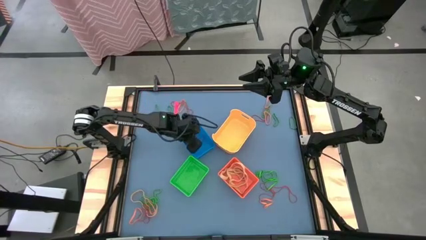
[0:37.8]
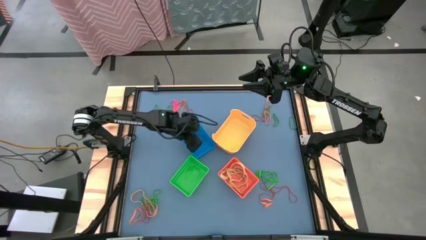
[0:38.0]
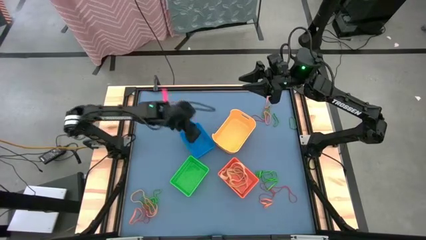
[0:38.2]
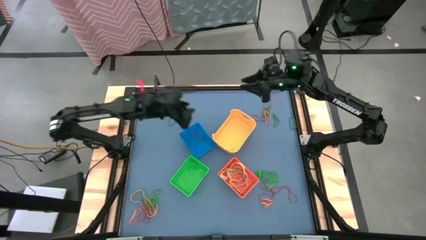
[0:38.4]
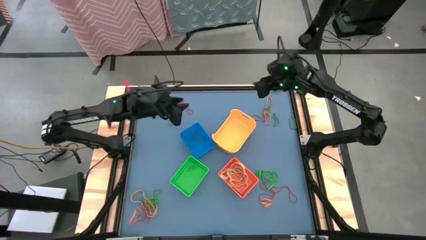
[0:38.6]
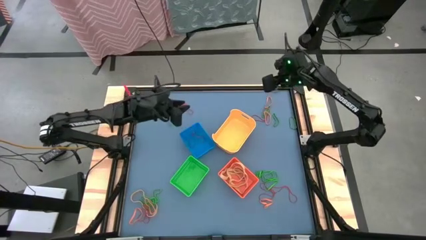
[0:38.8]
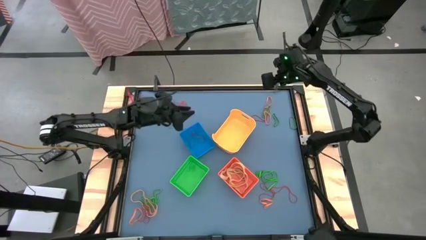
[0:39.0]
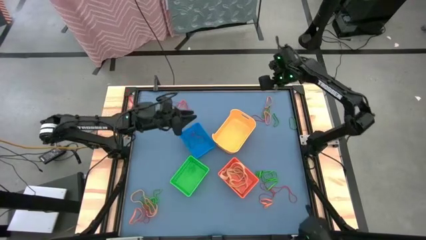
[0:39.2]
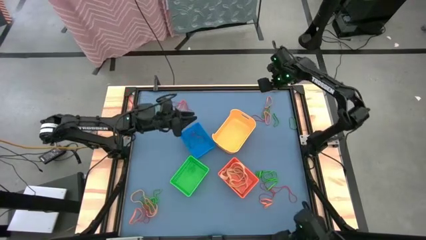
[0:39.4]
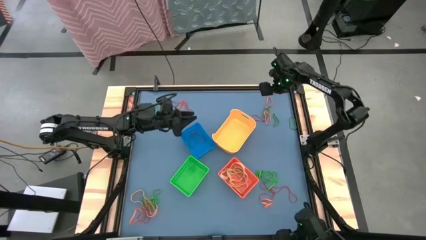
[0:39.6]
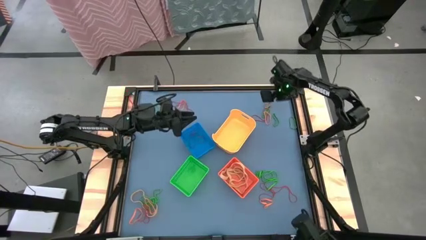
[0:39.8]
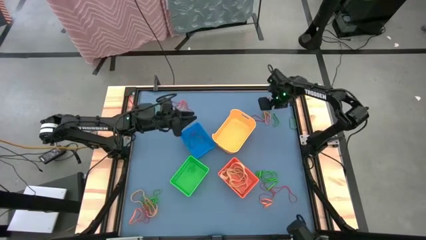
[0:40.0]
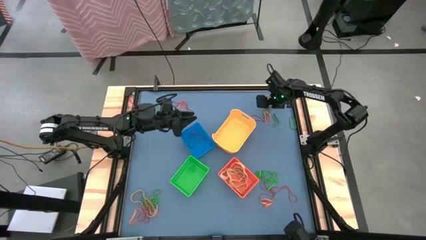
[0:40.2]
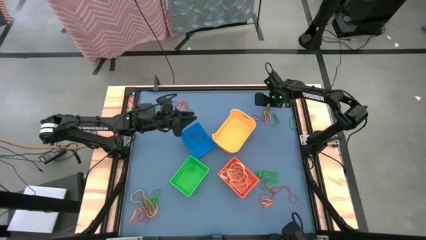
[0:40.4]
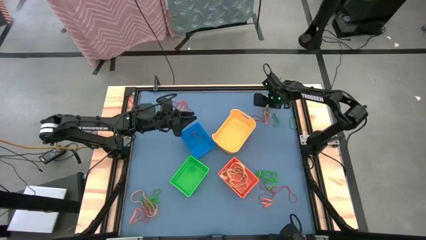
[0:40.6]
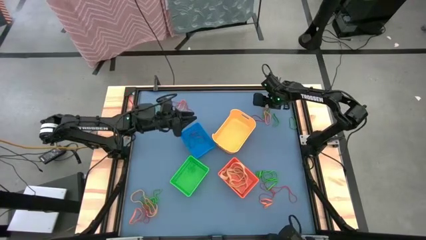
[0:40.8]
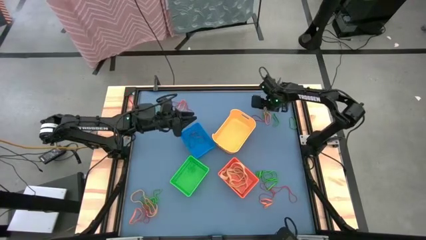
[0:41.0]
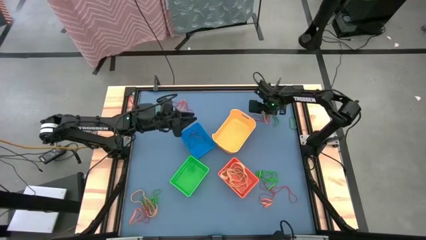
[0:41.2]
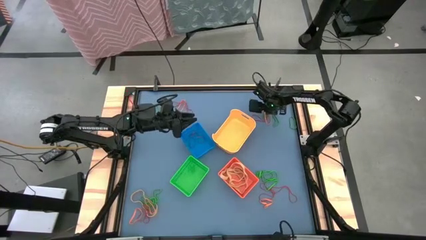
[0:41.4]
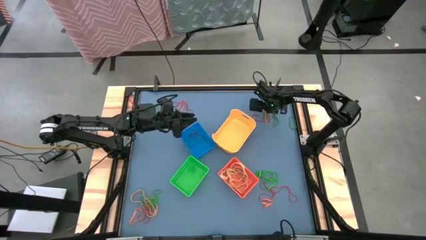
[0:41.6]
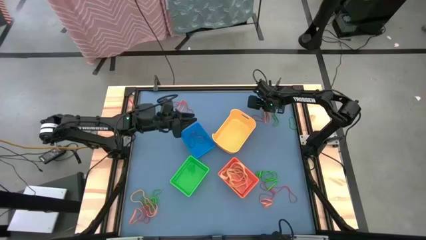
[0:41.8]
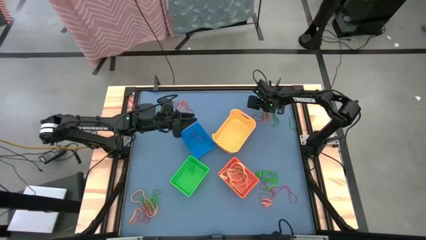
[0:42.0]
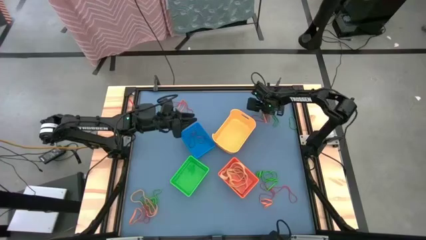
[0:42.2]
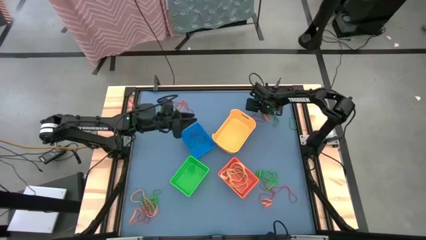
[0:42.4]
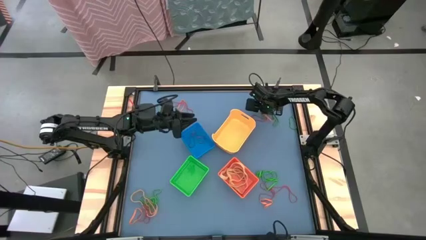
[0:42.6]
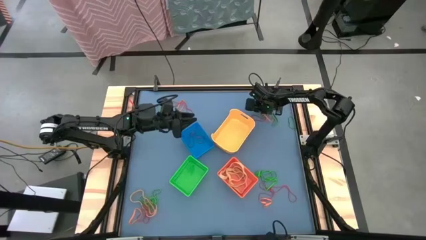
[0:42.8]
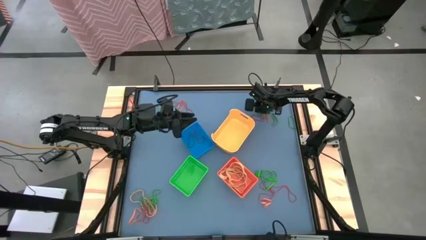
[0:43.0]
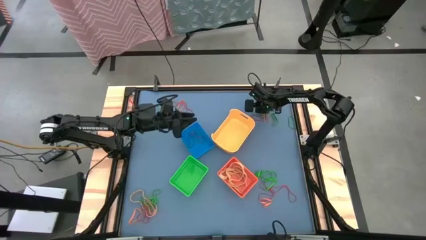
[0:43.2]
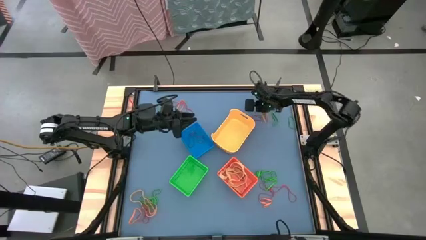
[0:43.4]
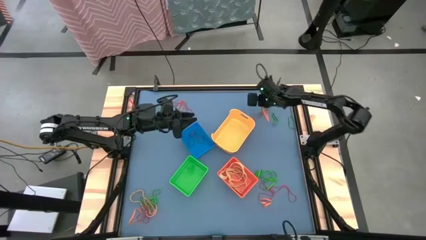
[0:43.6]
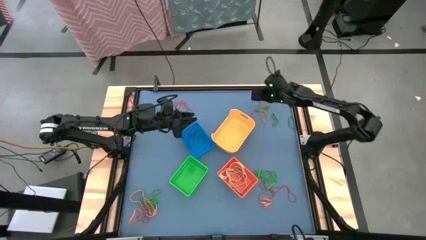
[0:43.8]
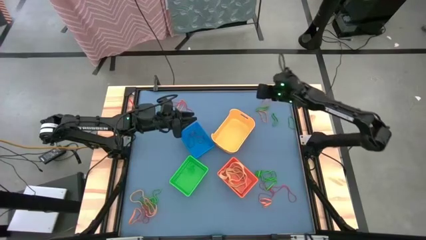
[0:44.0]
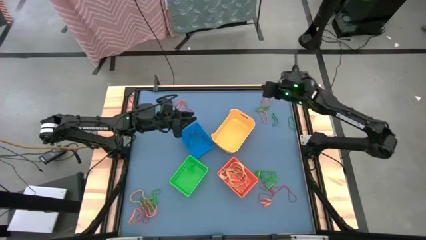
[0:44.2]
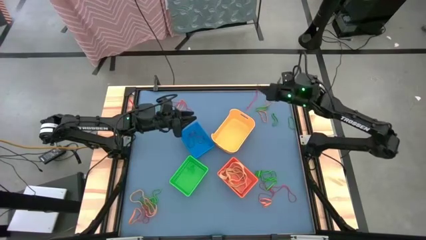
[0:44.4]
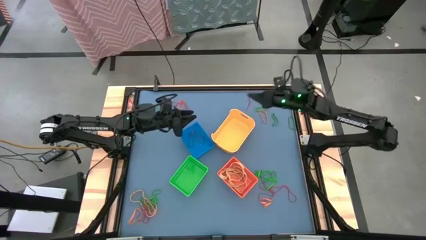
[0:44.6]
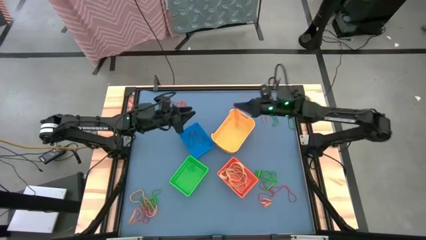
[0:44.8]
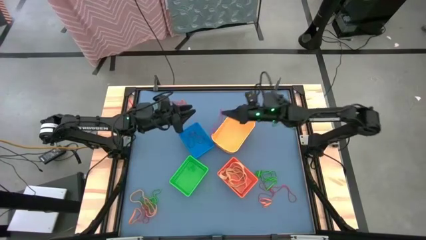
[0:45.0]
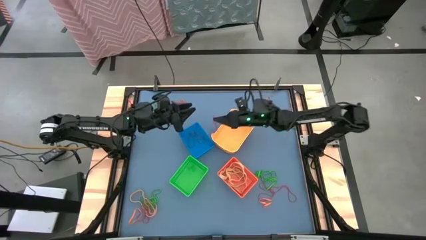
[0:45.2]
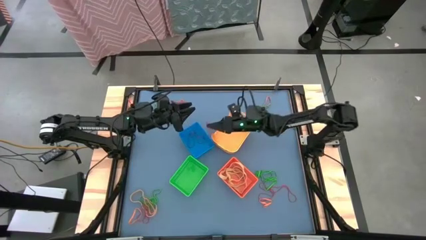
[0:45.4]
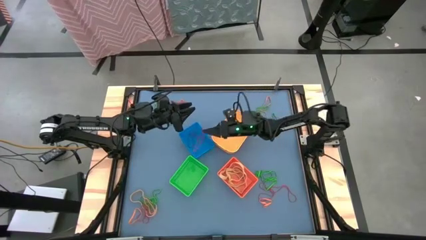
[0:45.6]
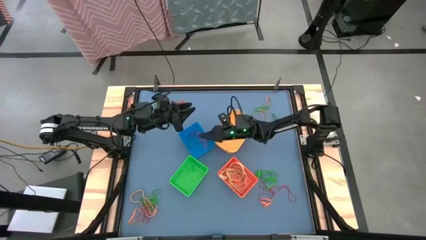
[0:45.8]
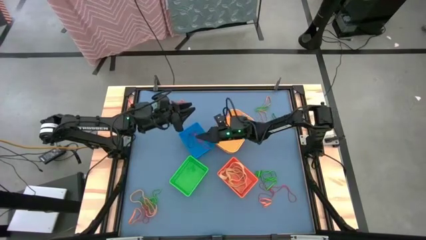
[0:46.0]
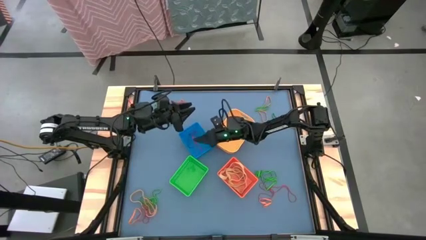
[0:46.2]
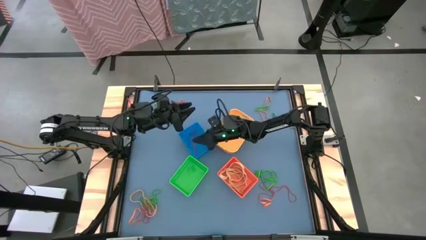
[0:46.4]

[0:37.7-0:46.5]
Task: Sort rubber bands into baskets
Put the red rubber band into the blue bin

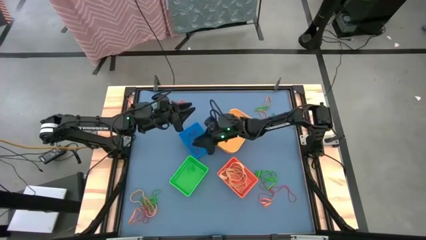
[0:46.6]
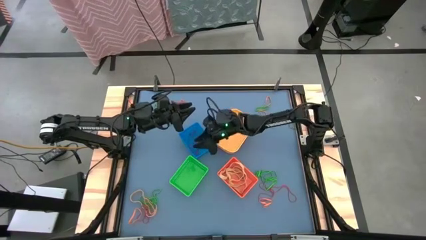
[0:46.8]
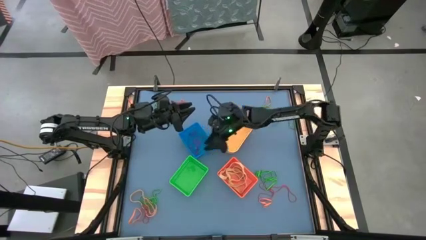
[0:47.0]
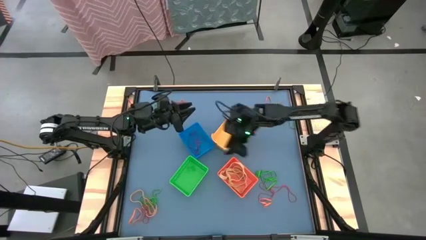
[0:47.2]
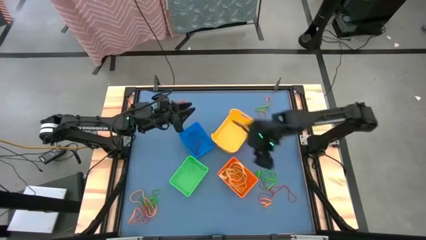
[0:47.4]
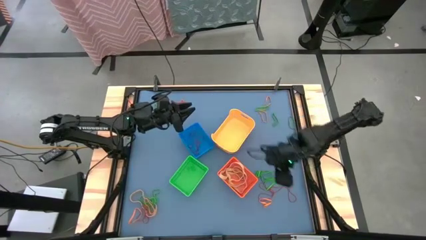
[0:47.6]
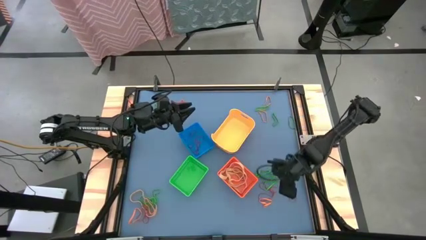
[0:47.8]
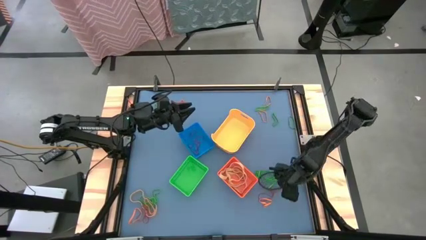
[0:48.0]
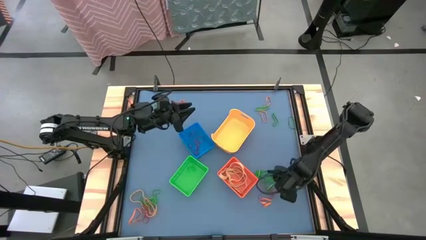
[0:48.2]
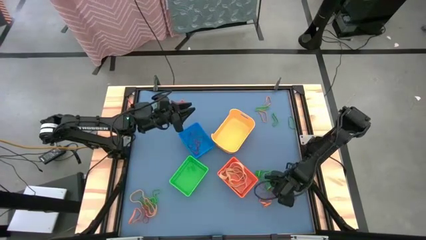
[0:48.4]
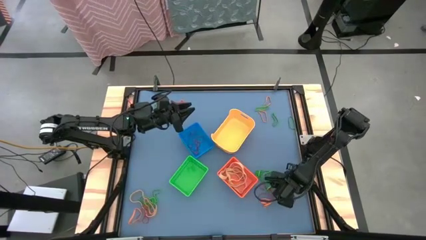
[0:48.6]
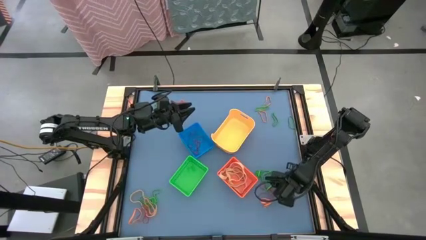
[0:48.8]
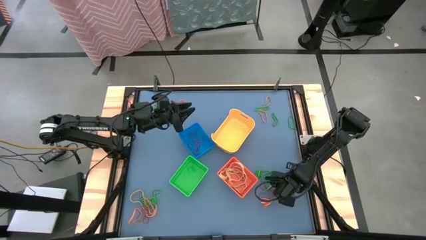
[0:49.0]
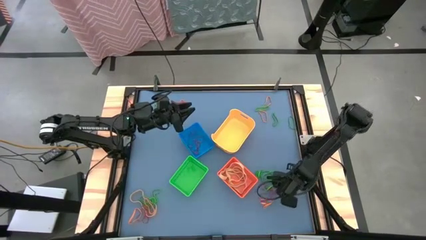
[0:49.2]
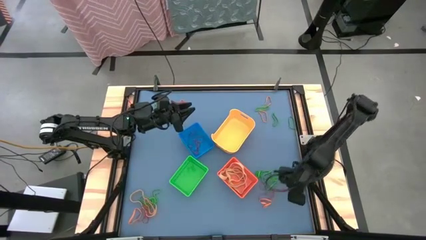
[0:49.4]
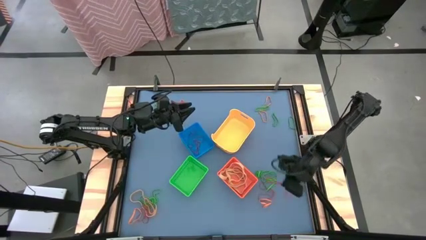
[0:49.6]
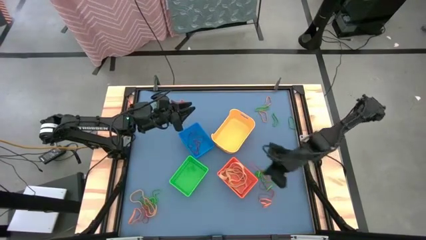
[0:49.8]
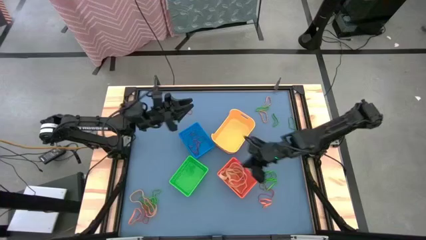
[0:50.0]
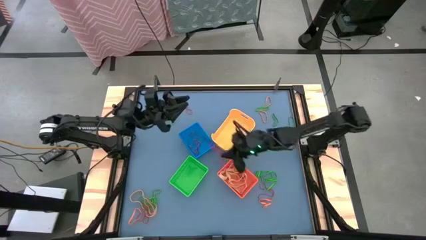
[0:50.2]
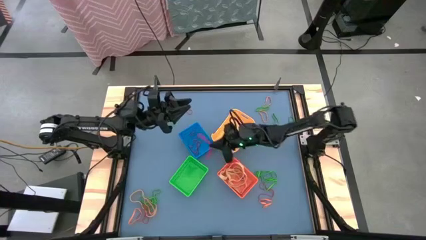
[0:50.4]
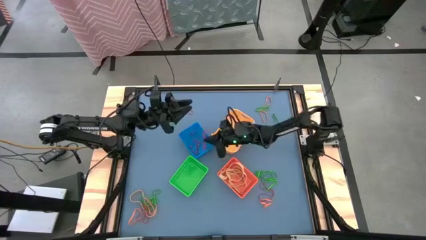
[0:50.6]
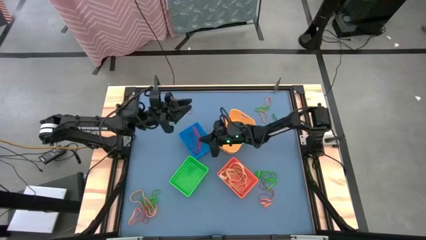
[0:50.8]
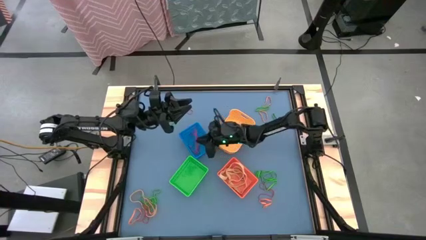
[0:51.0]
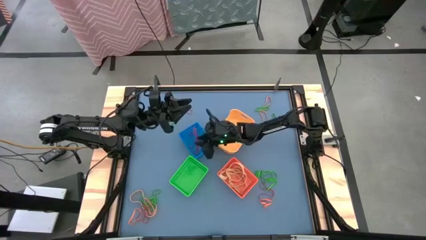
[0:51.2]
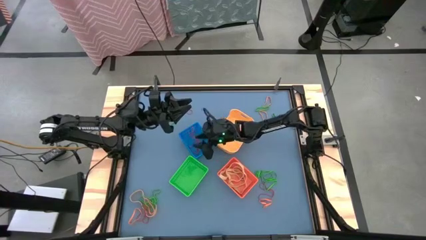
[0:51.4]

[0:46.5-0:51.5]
Put the red rubber band into the blue bin

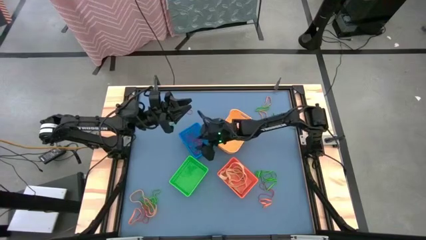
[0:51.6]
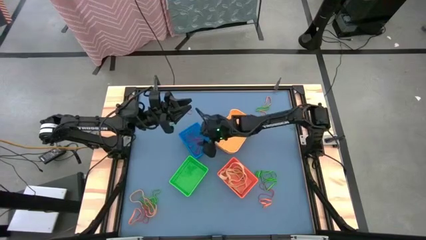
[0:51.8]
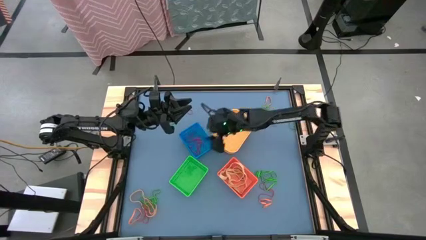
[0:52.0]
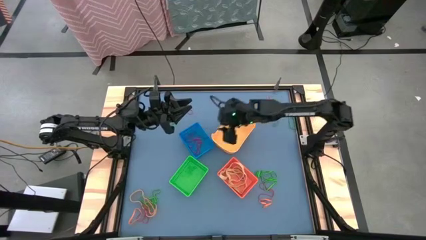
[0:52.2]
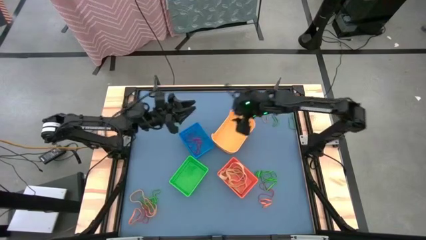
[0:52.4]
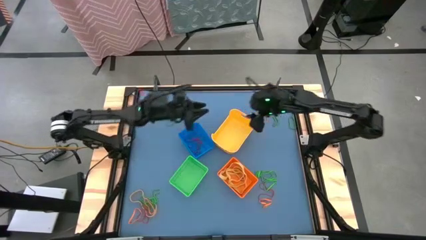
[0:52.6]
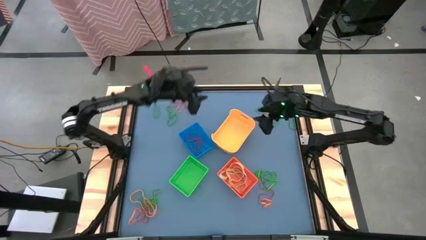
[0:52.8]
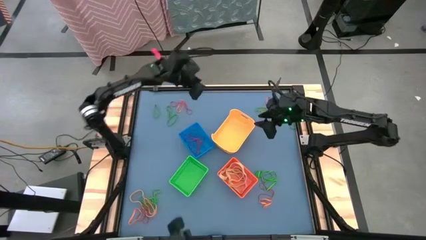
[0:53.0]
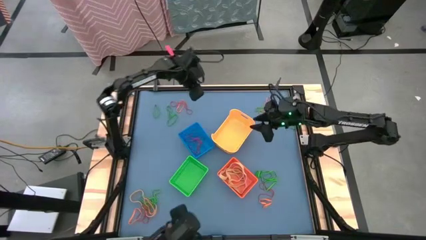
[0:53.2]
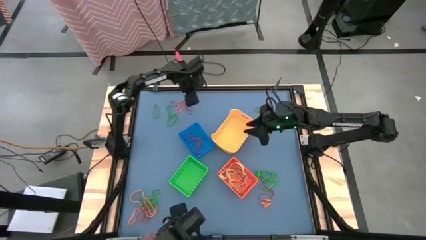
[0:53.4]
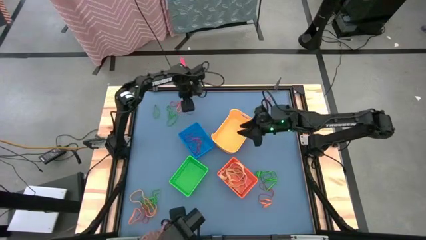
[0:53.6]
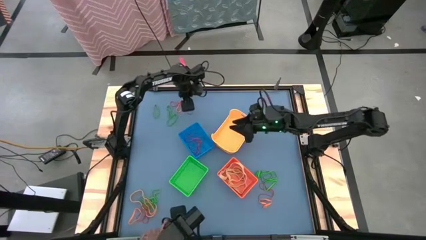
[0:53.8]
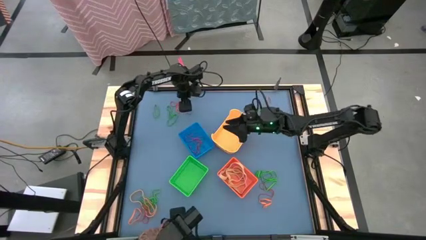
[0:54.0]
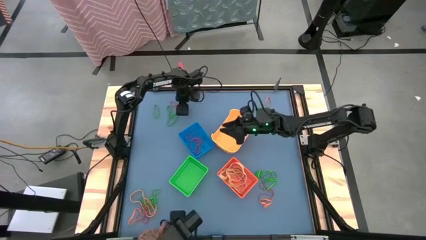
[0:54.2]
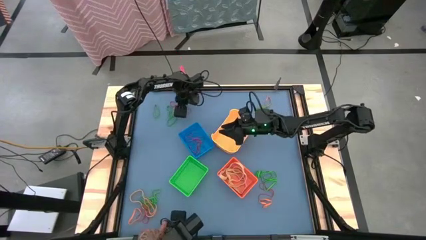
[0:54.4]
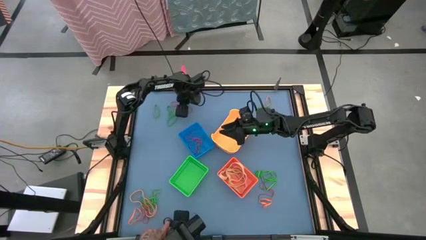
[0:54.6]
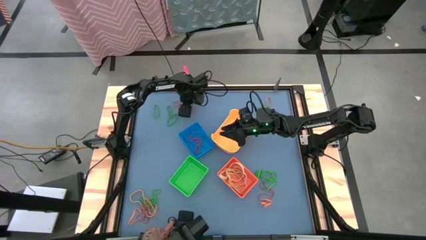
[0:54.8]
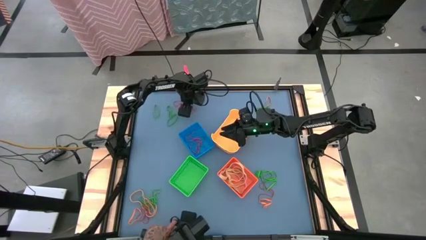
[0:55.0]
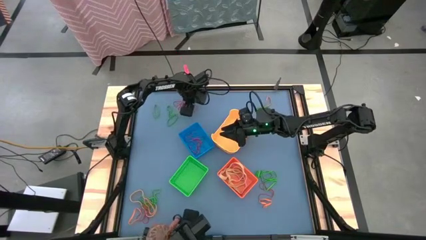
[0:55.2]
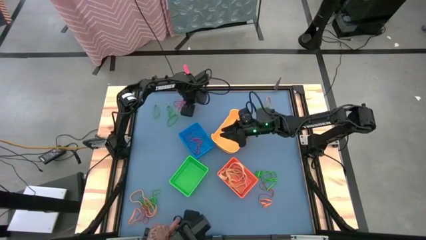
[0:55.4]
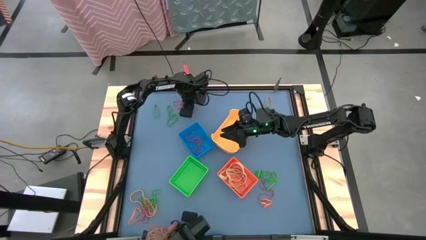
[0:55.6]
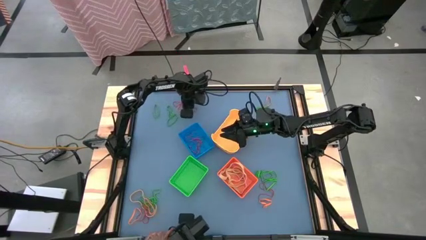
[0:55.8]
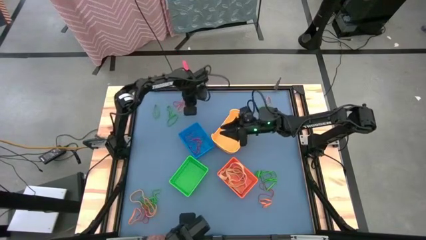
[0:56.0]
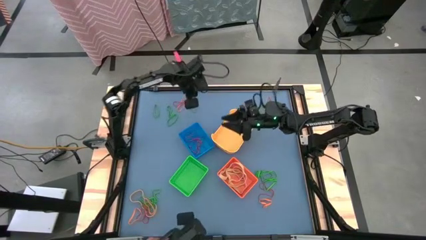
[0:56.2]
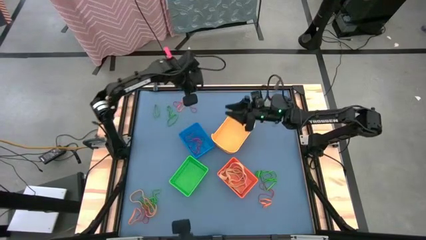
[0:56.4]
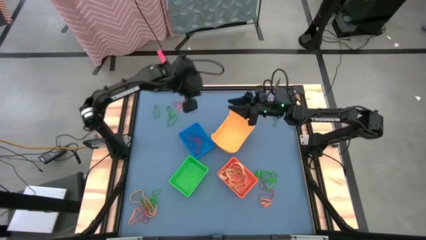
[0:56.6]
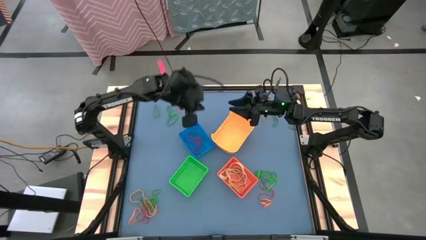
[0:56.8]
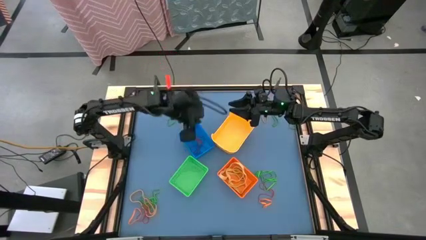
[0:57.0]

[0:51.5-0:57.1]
Put the red rubber band into the blue bin
